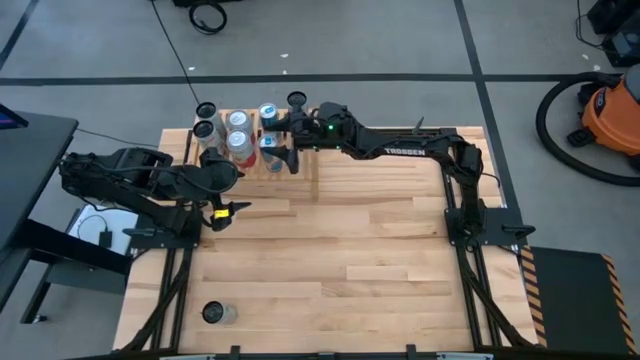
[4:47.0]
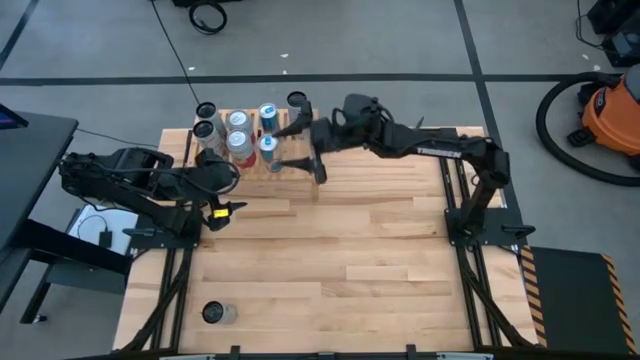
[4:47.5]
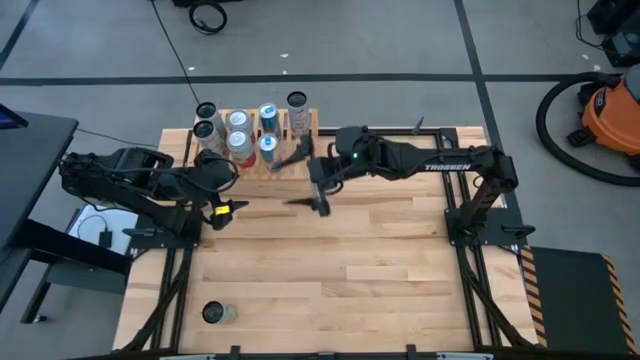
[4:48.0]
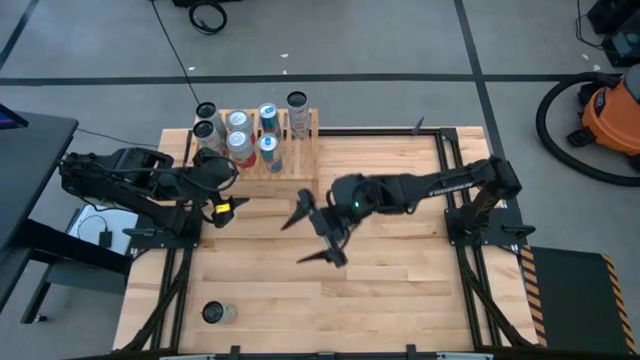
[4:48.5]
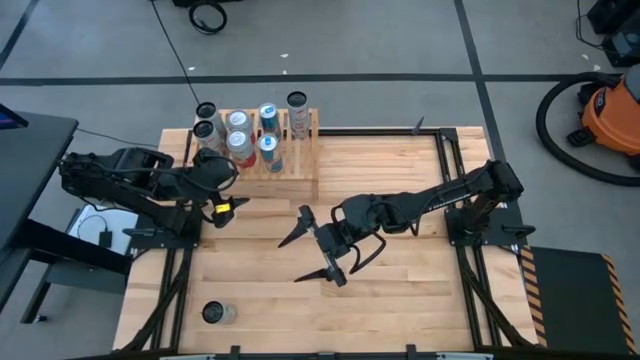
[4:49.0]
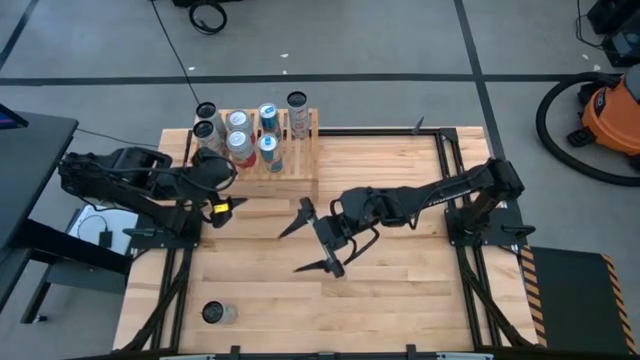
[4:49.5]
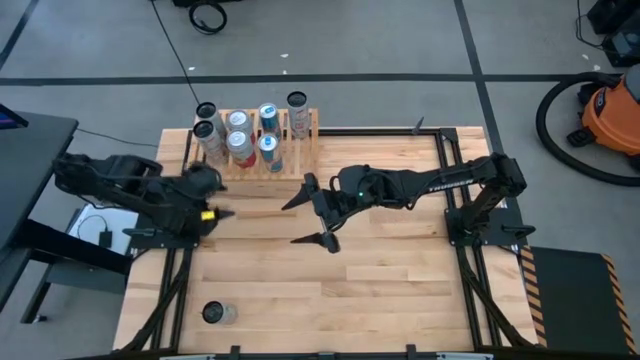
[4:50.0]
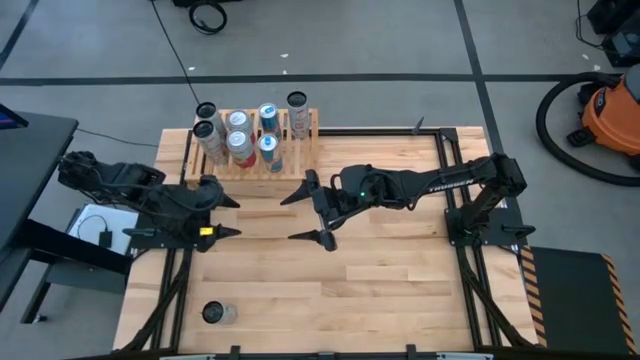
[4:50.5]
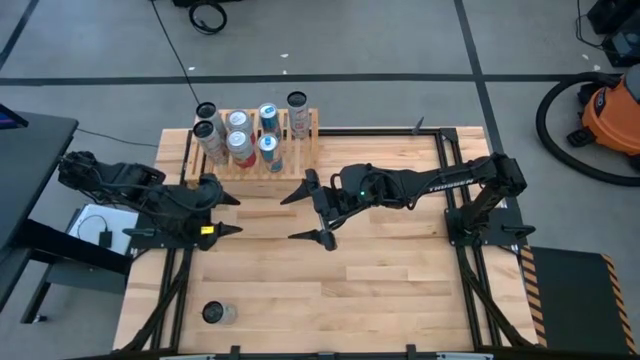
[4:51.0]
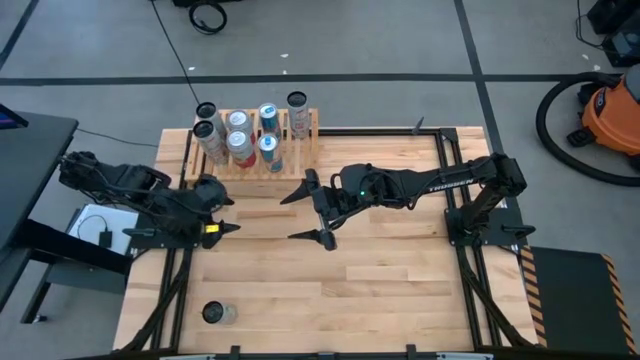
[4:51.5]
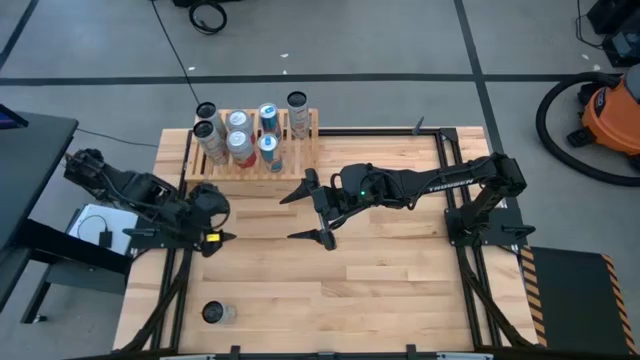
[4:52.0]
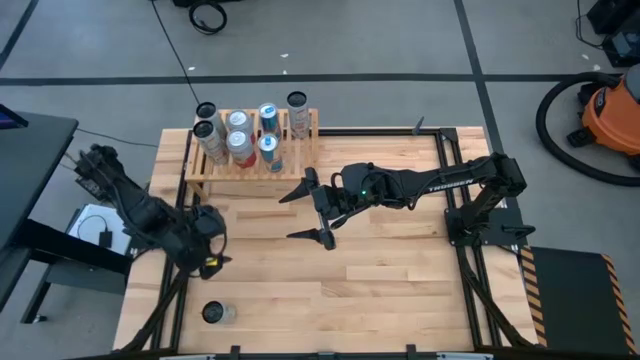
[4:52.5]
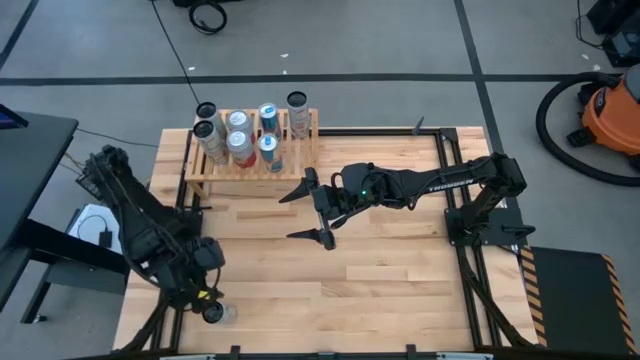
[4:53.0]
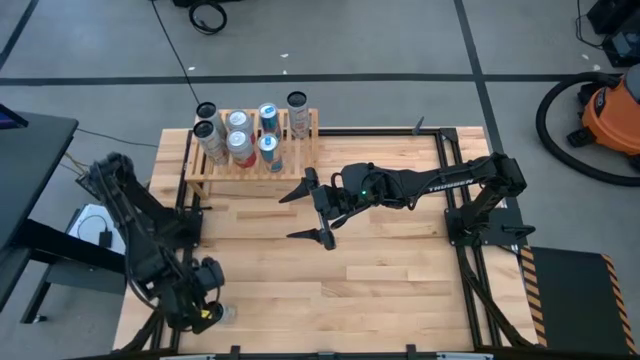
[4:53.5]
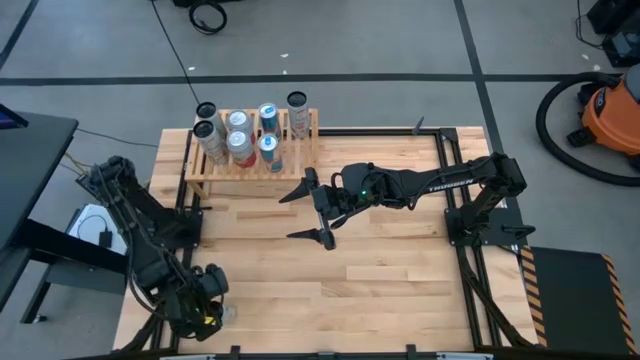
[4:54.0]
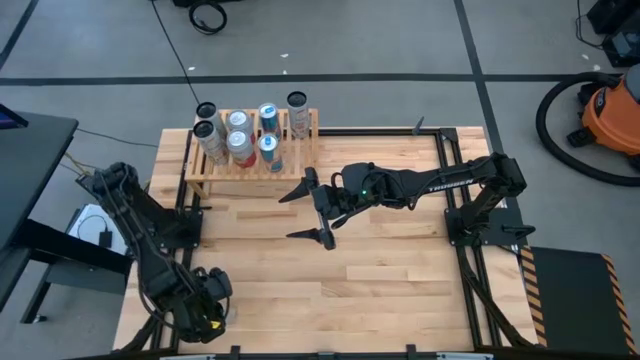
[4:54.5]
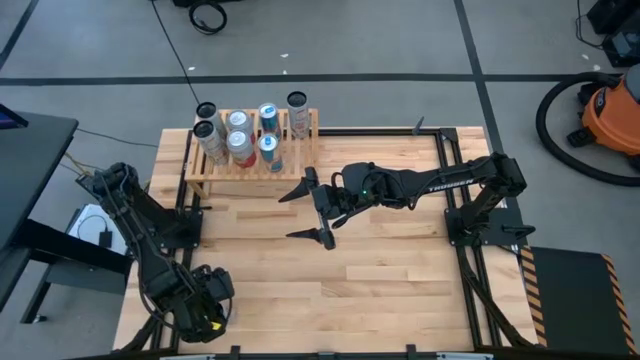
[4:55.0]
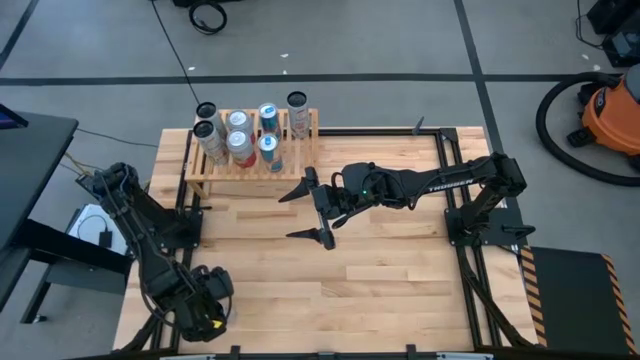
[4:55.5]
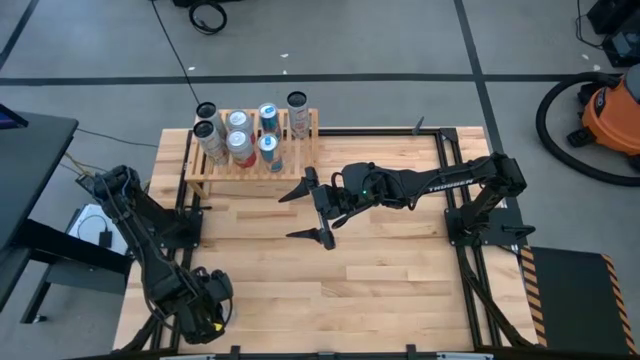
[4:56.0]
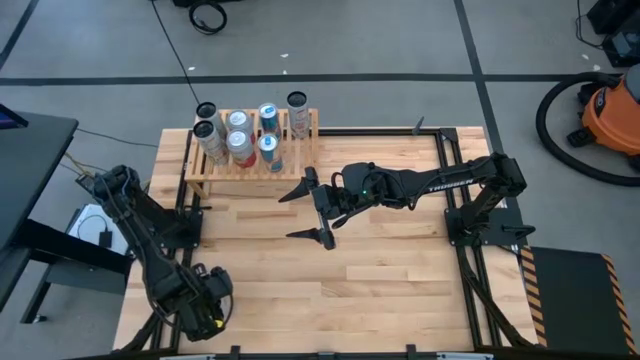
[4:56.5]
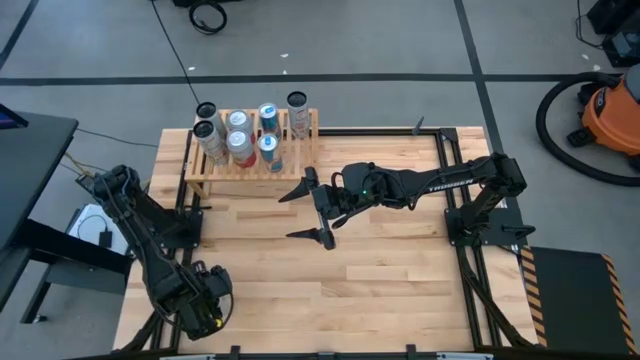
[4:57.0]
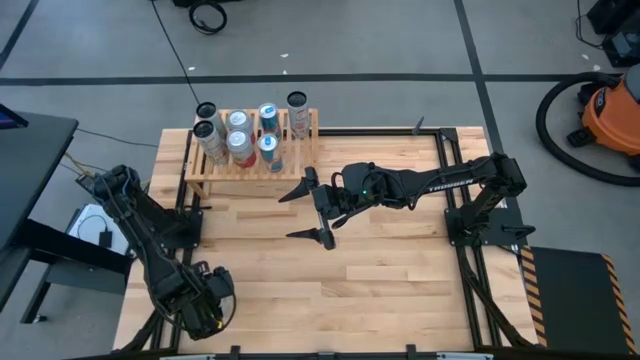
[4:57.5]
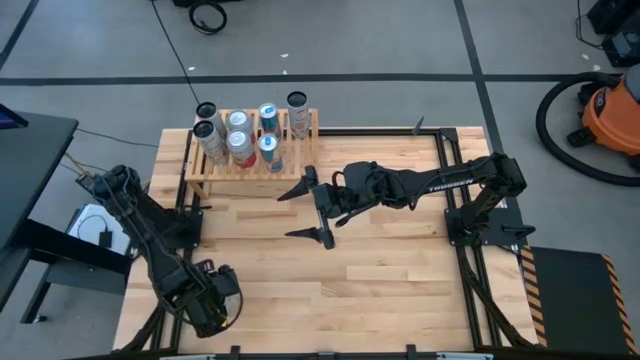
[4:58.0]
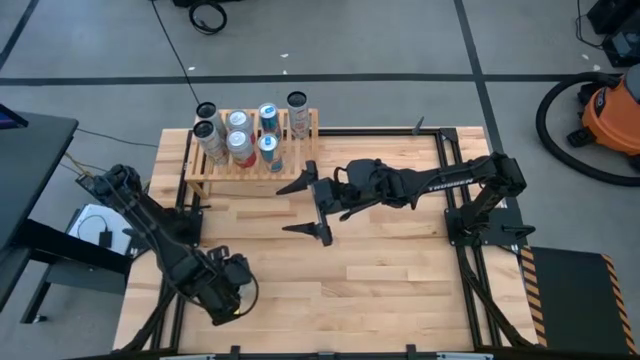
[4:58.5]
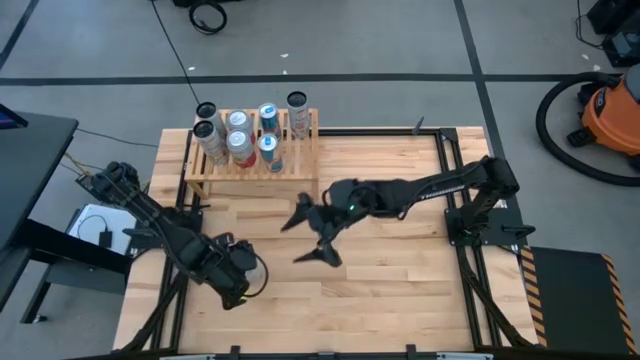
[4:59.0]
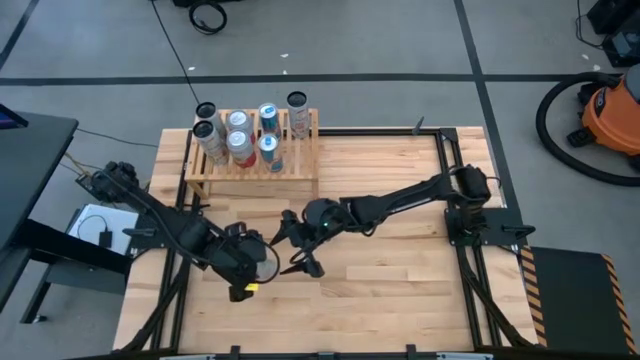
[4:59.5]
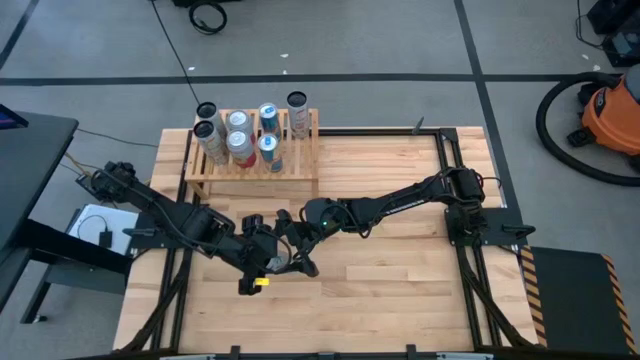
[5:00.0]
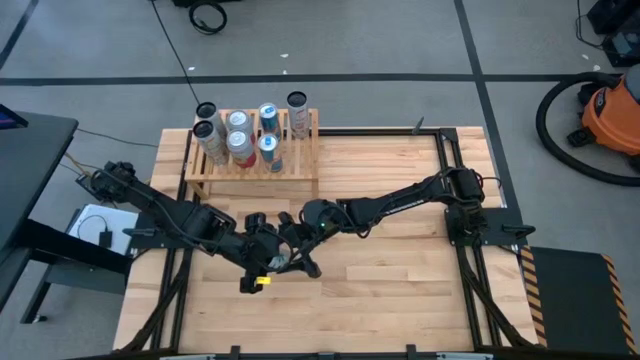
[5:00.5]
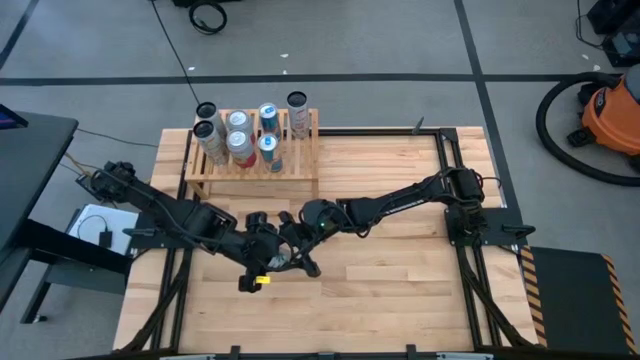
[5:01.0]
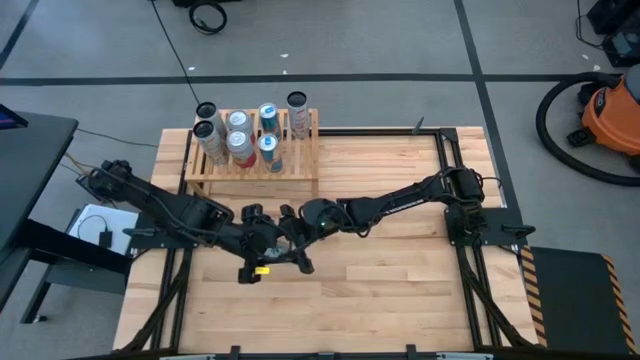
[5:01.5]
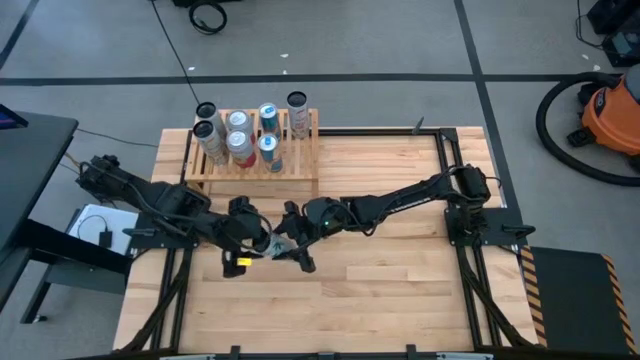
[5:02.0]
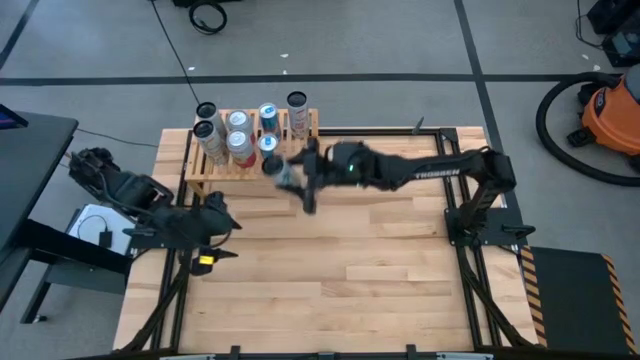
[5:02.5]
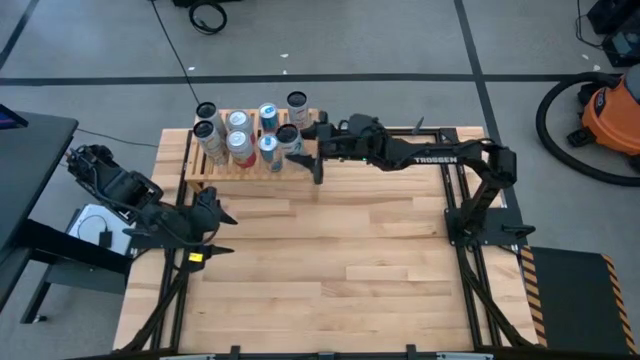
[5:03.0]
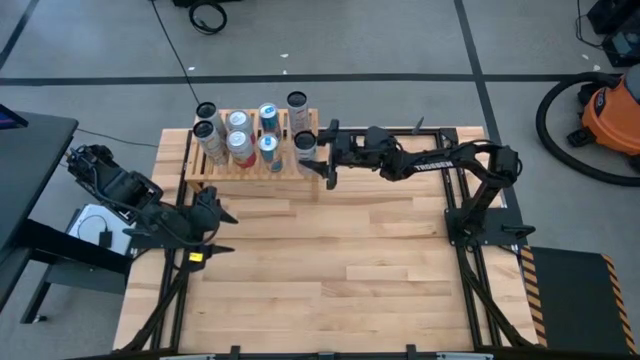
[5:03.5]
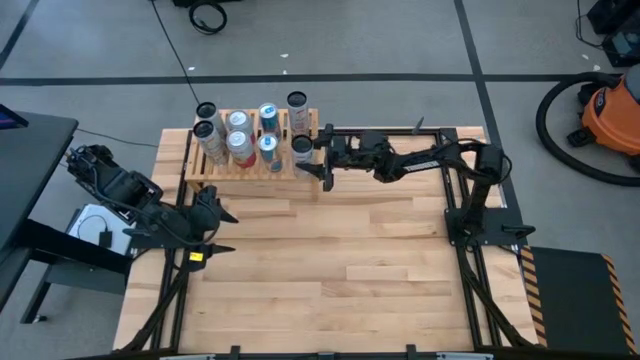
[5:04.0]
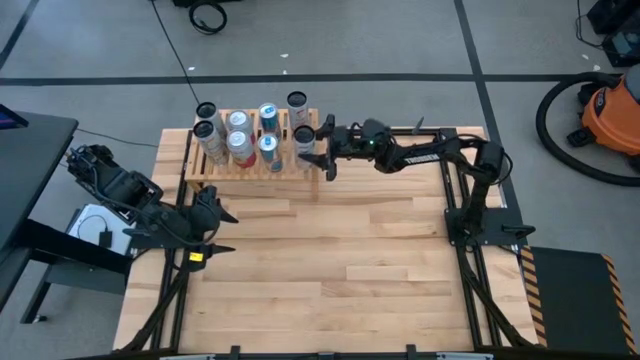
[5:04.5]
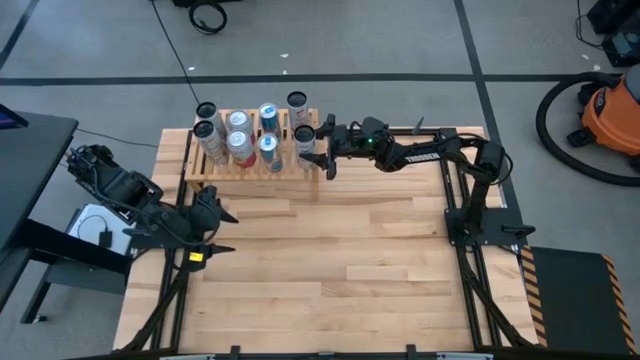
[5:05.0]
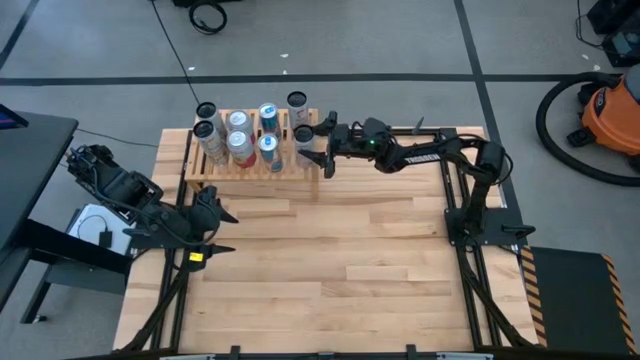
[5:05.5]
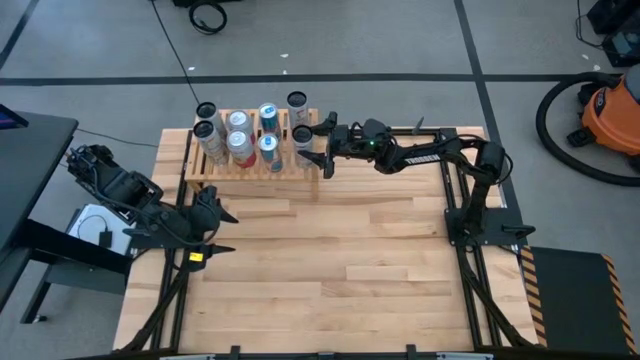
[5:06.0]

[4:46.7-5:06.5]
Task: Place canned beverage on shelf
Put the white pink soda can on the shelf aligned with the other white pink soda can

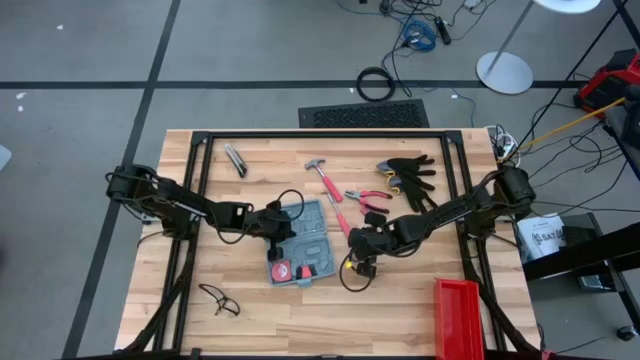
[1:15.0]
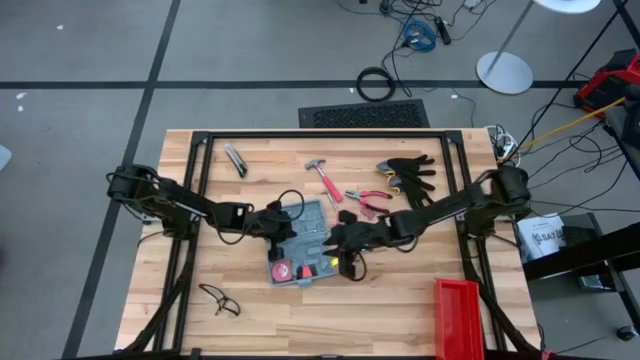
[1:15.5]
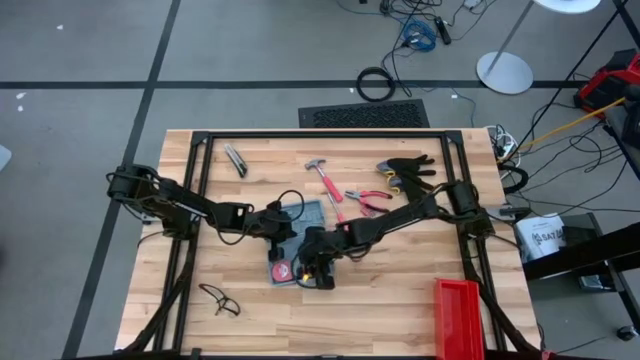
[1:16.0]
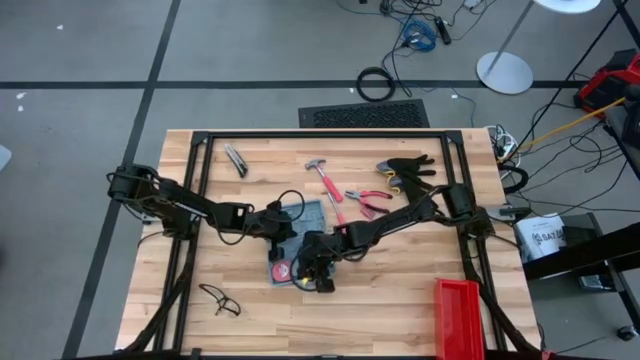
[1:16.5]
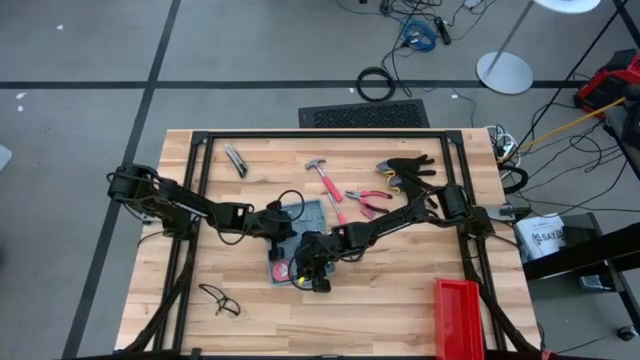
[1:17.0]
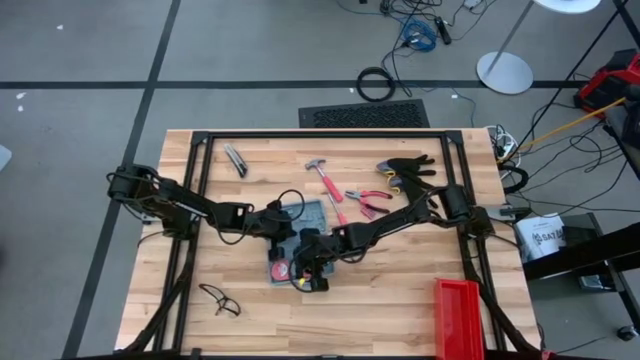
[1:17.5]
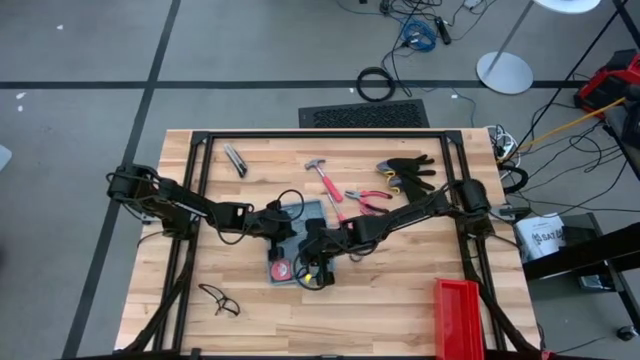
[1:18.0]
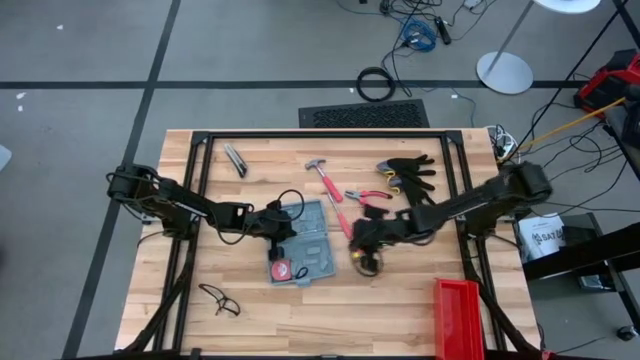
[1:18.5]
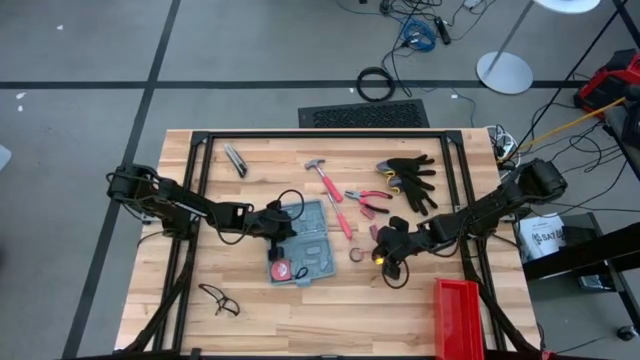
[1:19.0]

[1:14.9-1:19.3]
Task: prefit tool cases
Remove the pink hex key from the gray prefit tool case
